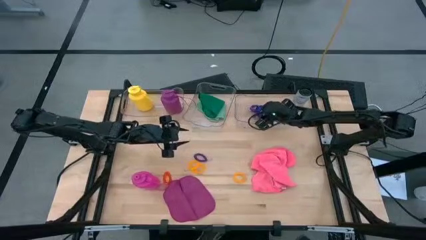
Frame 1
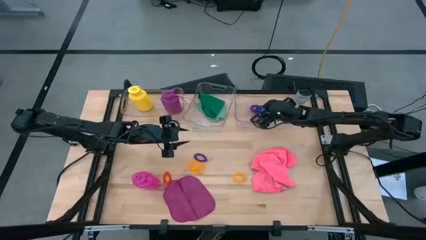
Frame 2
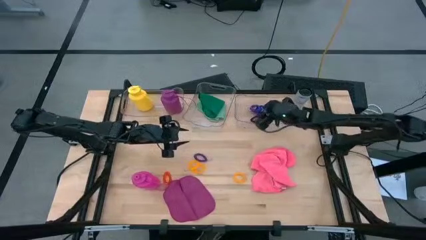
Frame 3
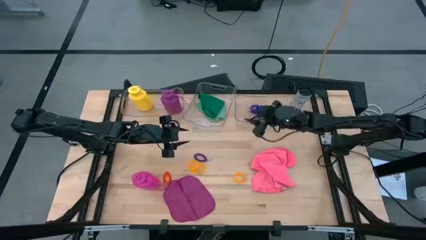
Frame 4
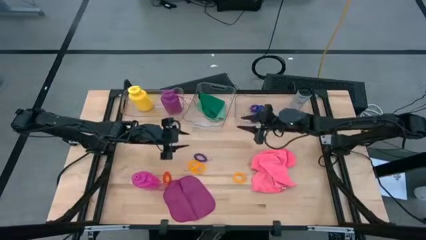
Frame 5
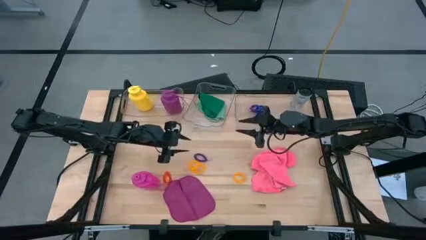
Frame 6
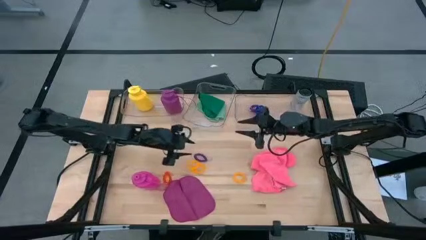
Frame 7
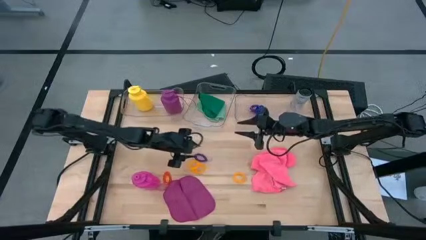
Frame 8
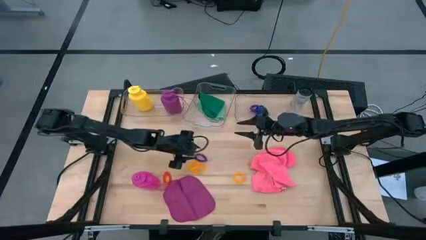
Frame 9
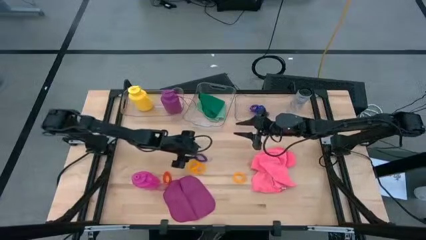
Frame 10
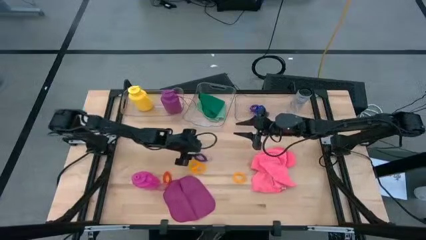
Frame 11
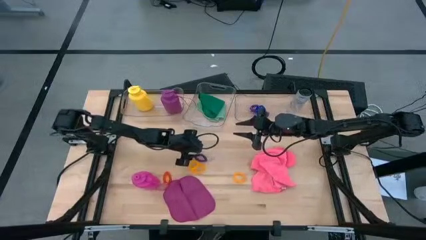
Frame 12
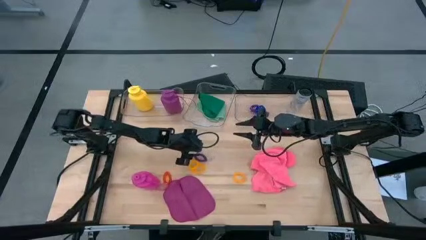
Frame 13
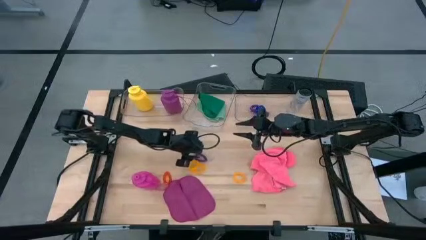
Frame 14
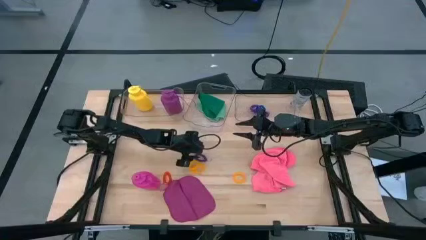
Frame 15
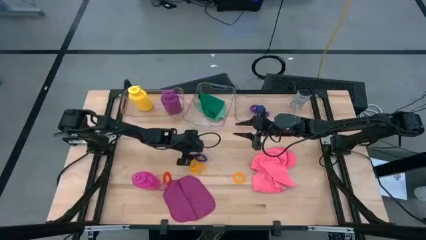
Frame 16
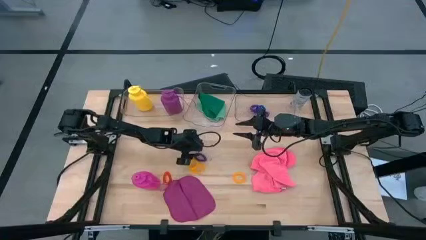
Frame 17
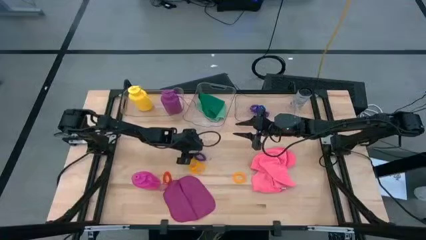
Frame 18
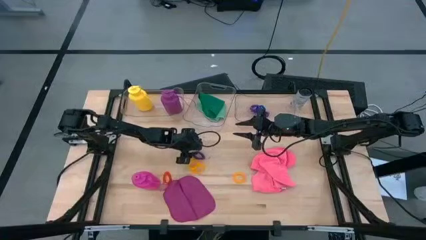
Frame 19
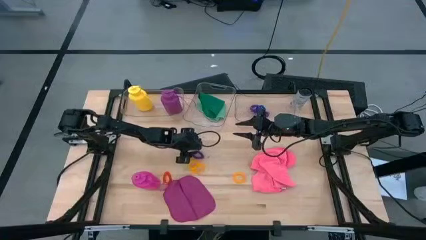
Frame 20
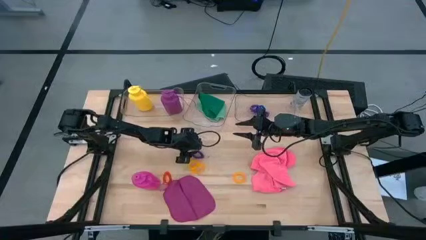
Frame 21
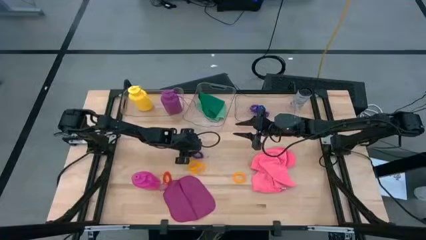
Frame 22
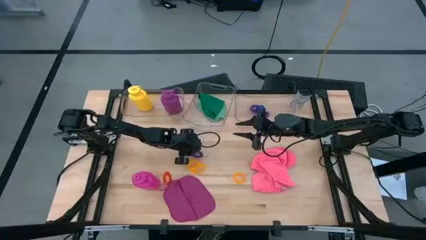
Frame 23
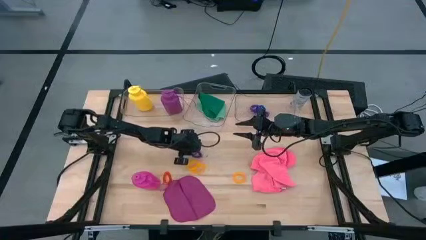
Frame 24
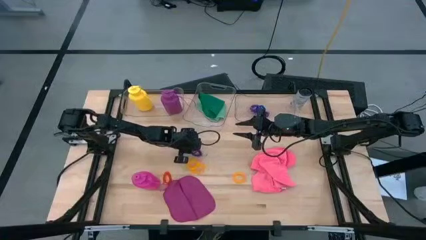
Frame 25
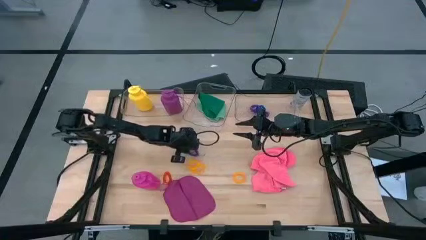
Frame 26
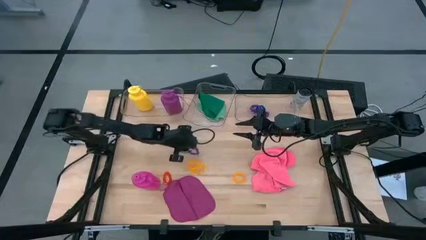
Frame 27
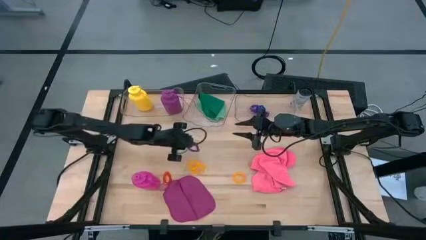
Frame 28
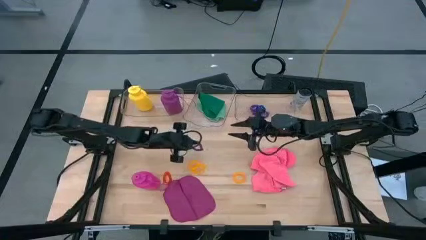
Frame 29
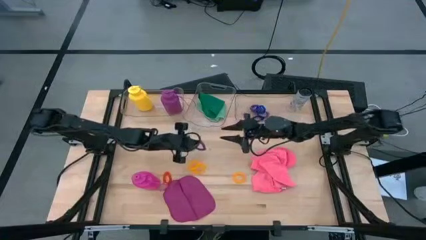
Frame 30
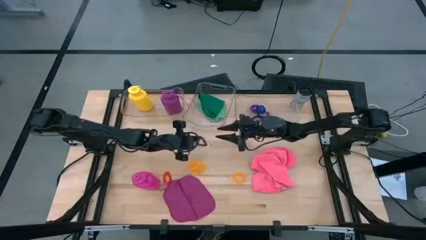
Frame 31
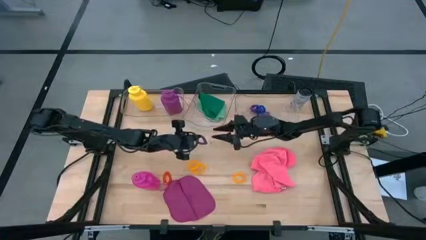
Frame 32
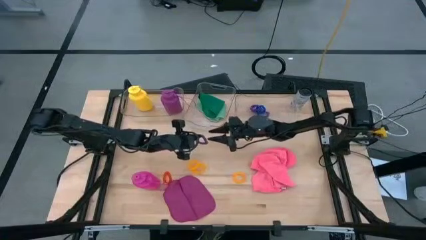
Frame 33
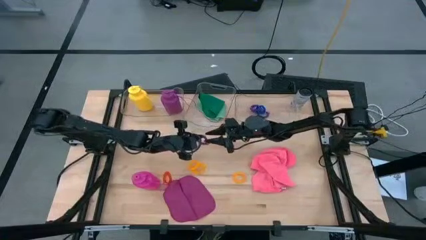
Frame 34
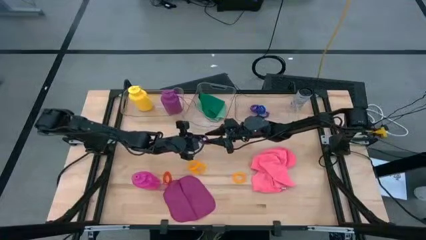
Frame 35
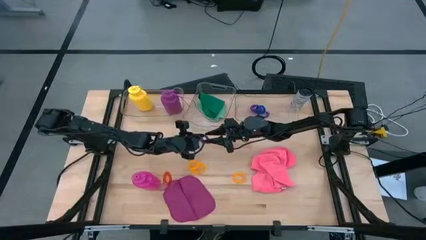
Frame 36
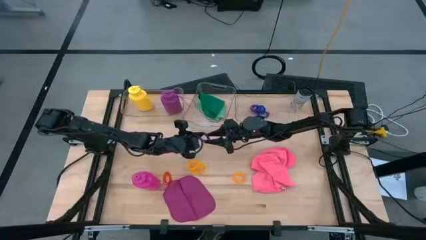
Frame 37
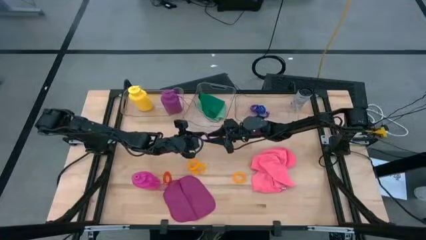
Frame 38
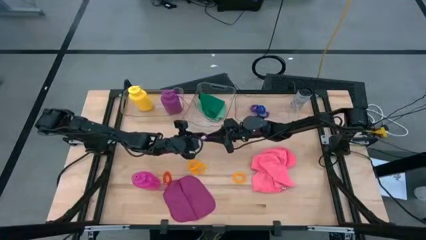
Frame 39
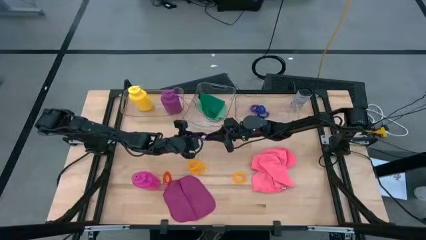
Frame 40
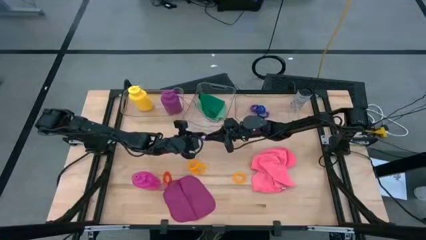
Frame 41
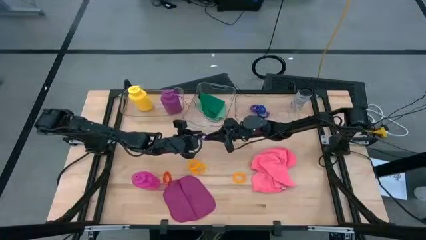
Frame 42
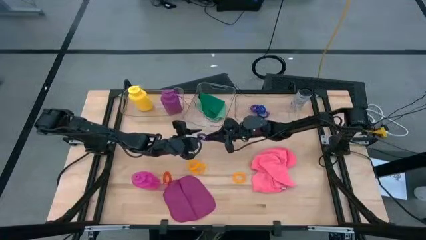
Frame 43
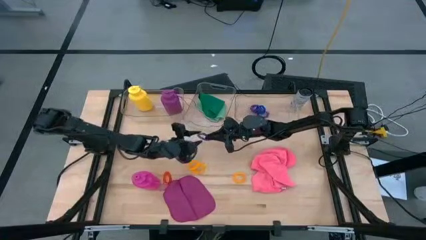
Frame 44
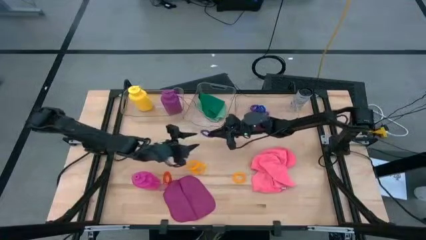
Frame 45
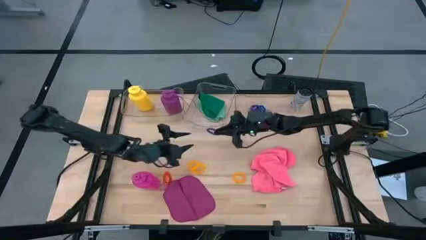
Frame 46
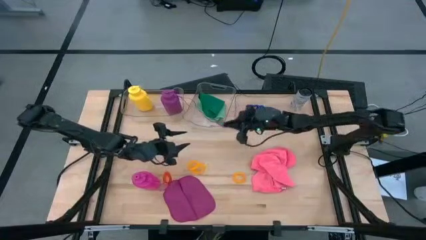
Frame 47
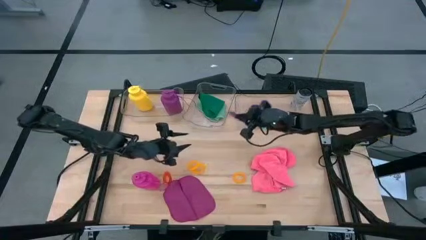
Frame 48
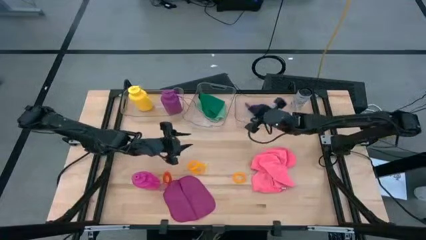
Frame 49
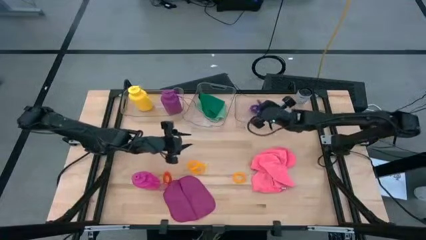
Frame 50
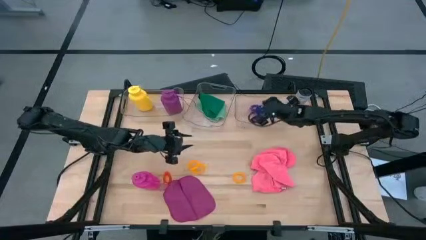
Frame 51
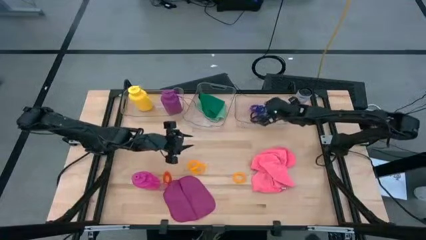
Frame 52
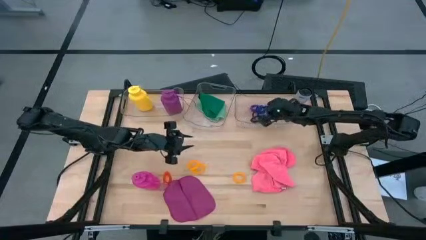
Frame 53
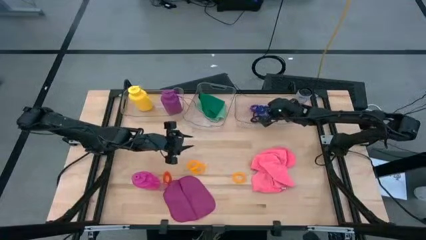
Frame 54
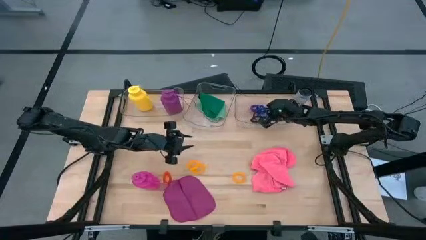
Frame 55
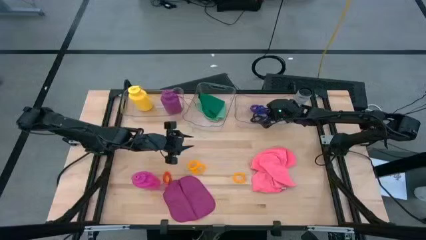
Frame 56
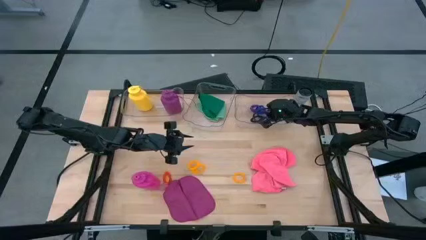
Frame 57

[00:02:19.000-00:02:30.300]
Task: Pick & Place Sports Items
Put the purple spring keychain into the right transparent bin

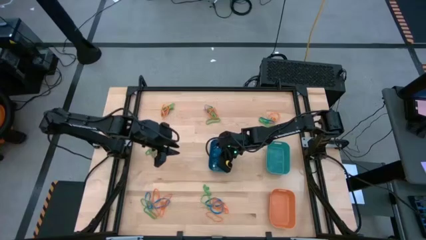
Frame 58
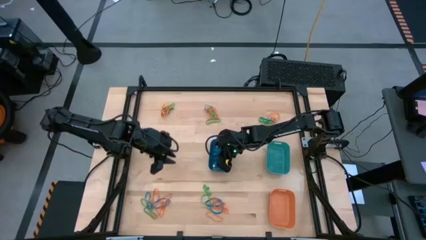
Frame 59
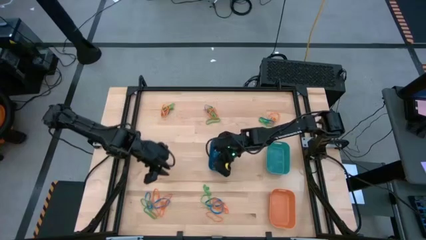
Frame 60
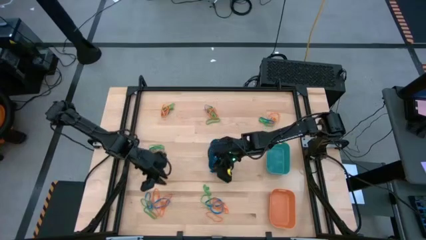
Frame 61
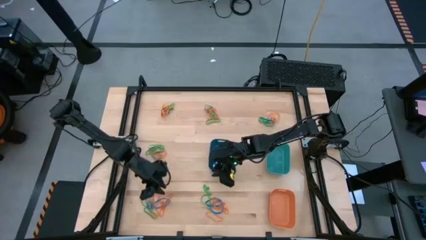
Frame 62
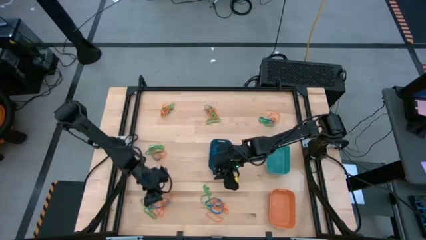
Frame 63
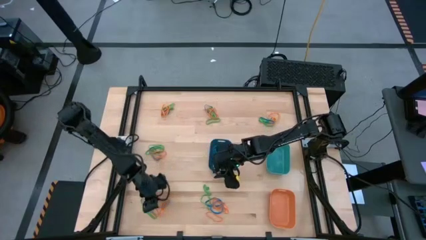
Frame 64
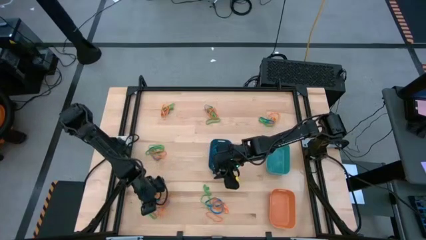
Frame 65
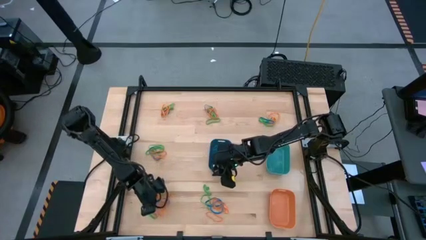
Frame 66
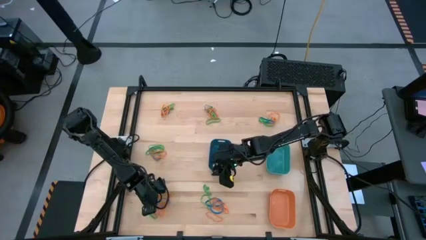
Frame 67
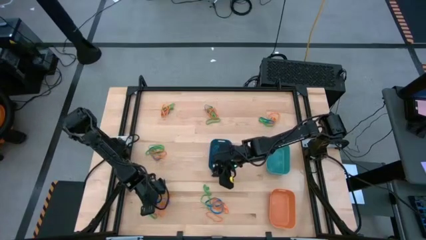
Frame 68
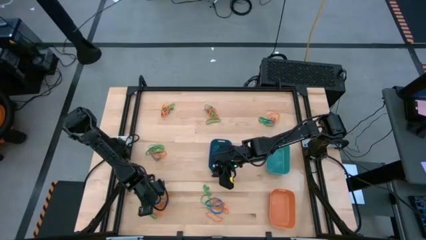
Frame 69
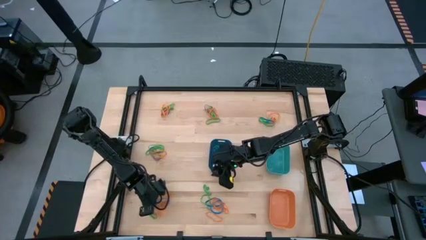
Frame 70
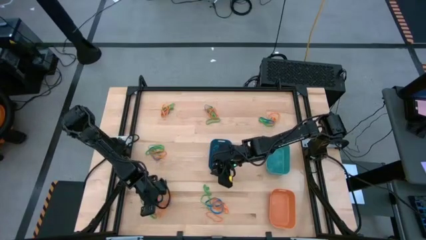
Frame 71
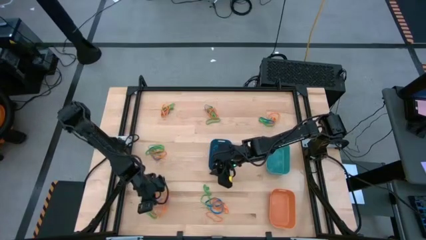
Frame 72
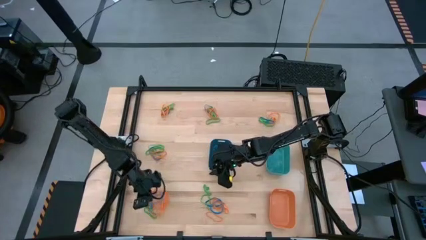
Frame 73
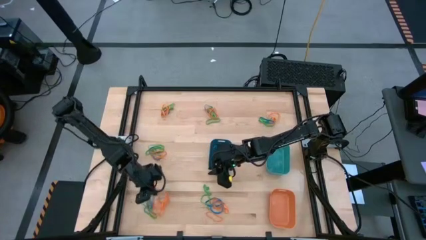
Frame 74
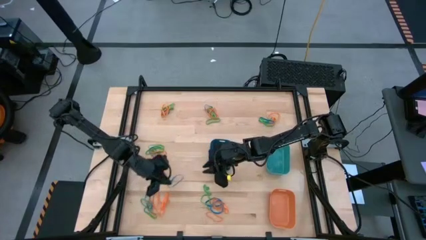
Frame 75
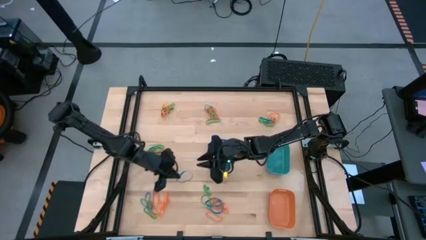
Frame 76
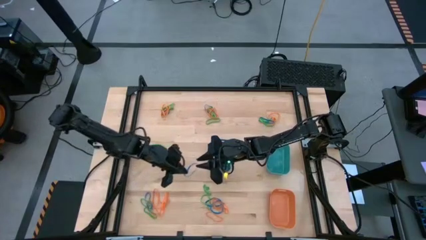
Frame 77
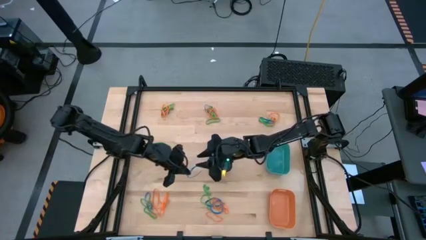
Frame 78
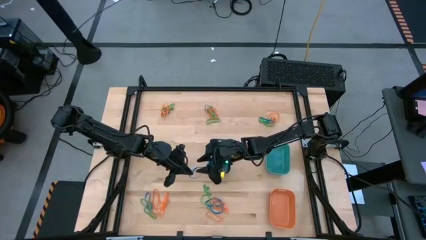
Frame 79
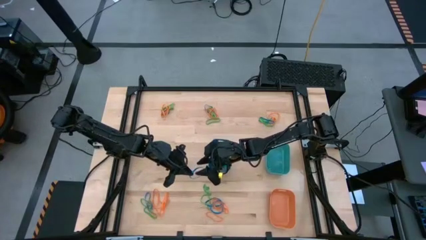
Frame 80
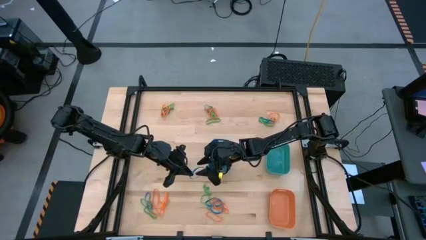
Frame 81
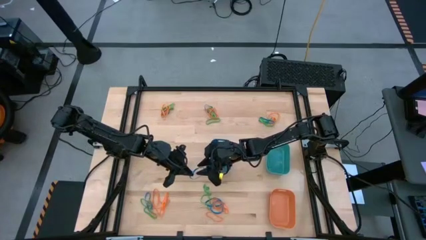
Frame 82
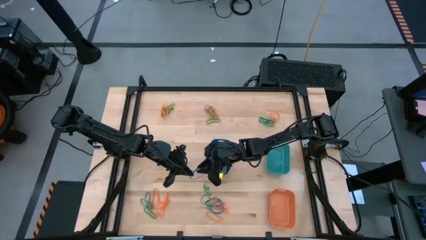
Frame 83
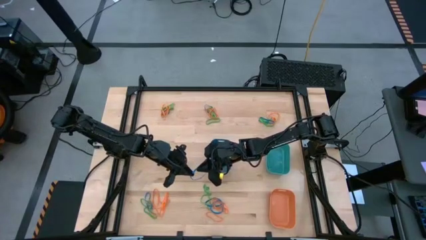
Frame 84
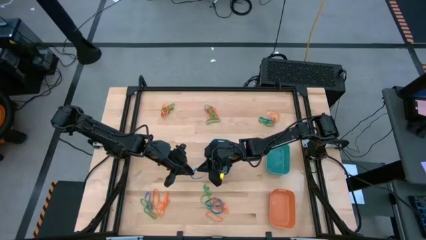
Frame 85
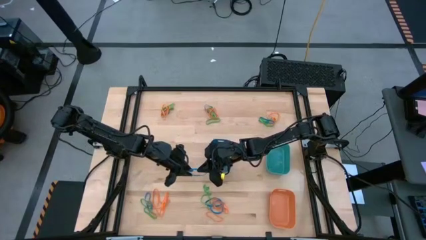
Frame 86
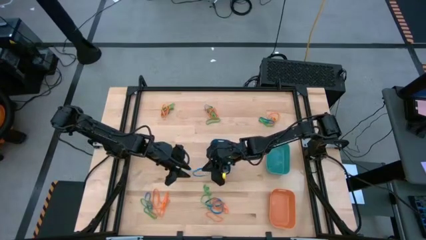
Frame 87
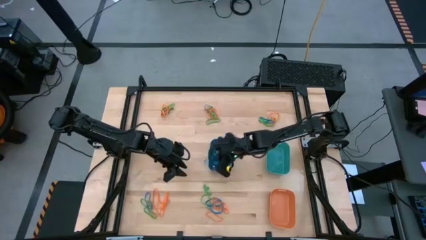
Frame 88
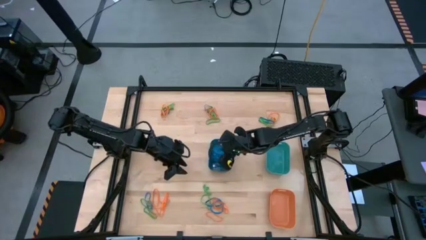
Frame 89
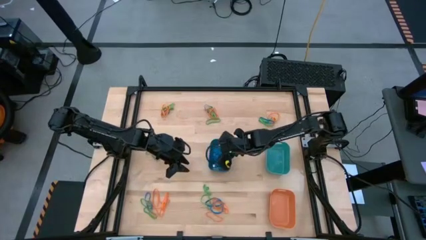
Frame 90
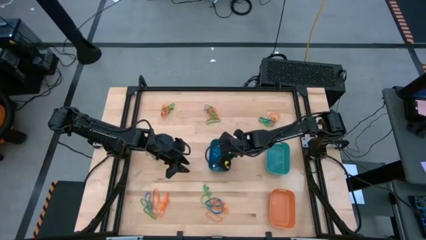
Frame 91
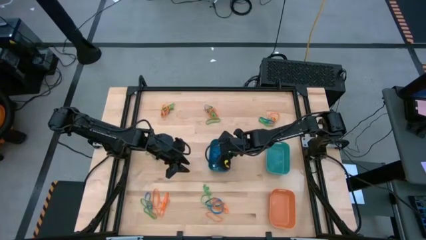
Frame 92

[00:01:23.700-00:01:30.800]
Task: Sort rubber bands into baskets
Put the blue rubberband into the blue bin
